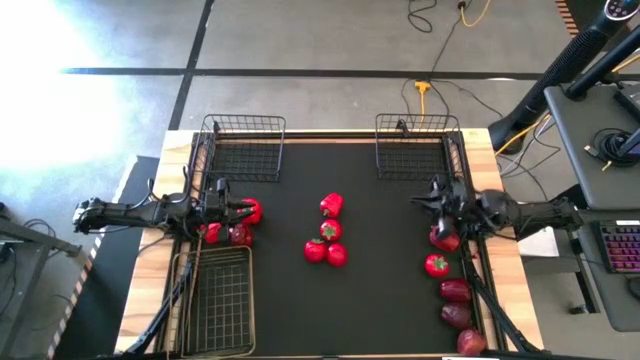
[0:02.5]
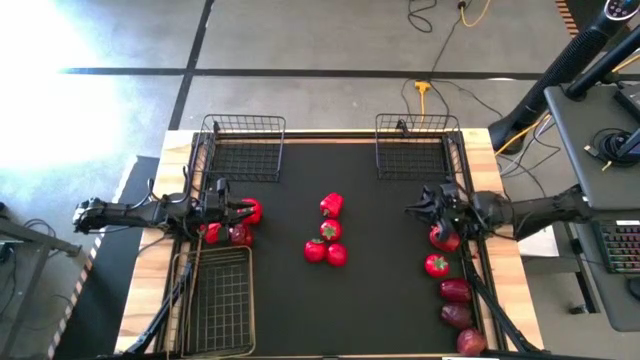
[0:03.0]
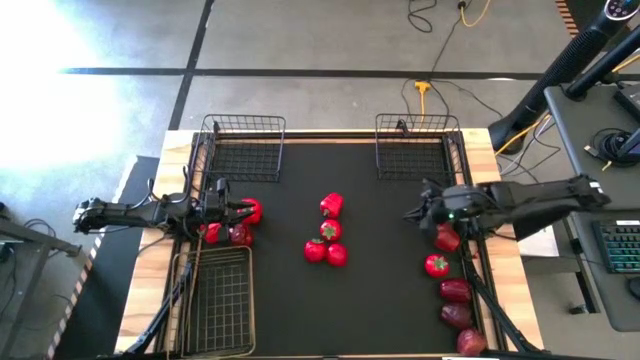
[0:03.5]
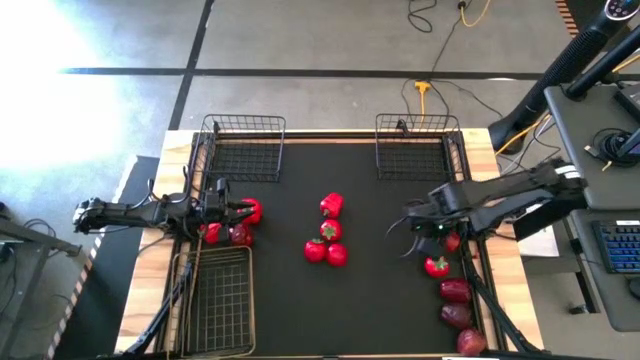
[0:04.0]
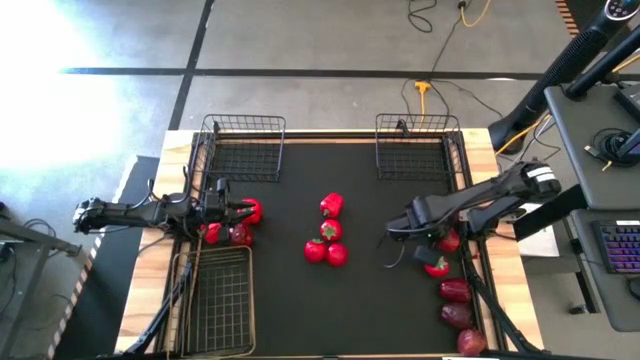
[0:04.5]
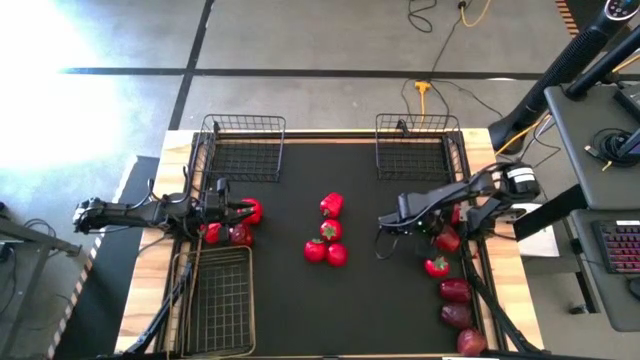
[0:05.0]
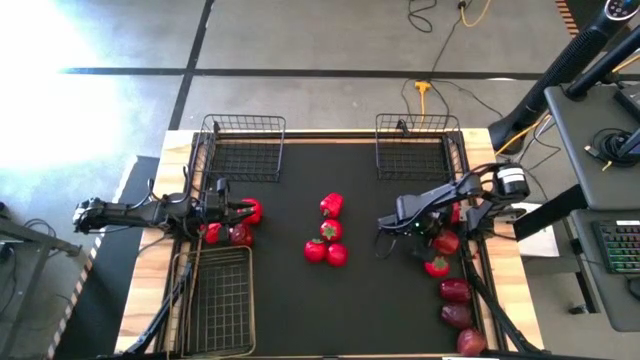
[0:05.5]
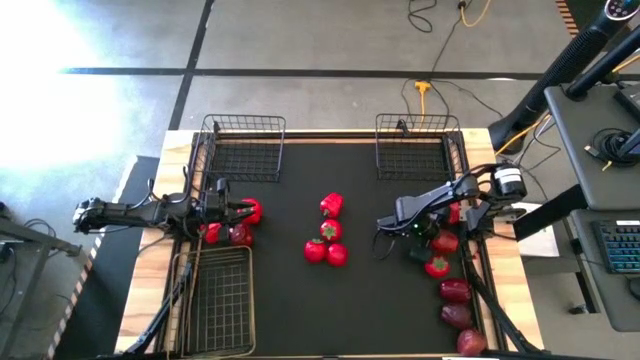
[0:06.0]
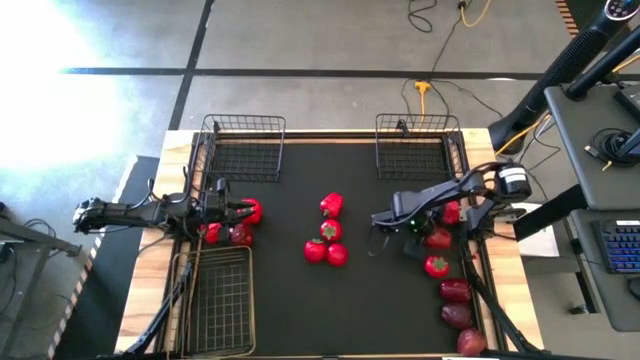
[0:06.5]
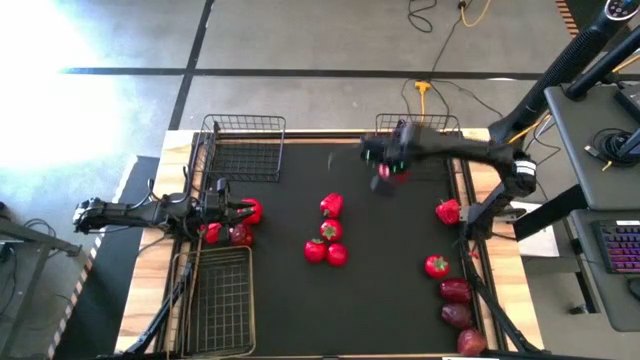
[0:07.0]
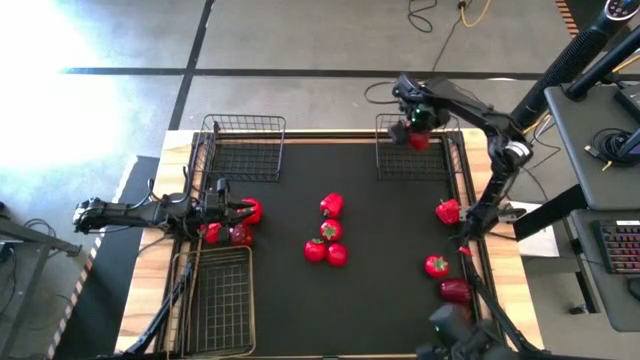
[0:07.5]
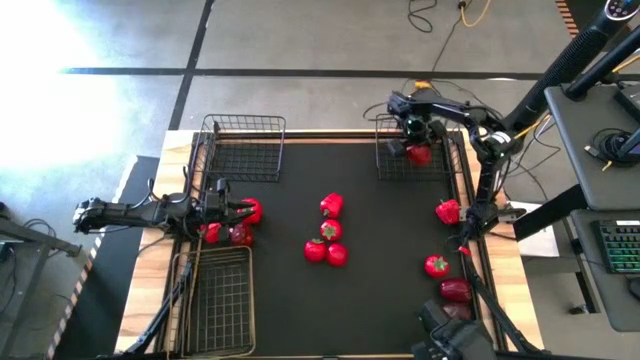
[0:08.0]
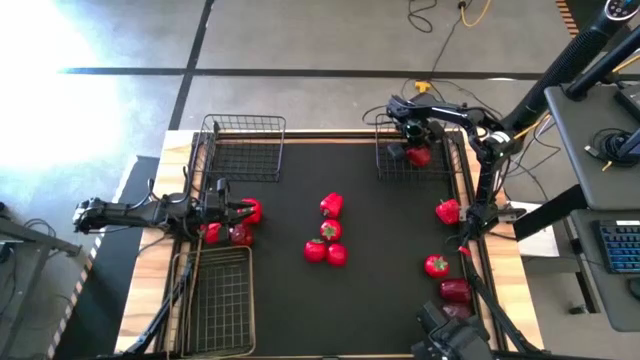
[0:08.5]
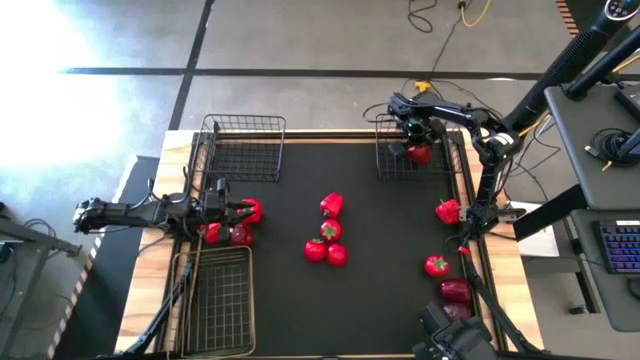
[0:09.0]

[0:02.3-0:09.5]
Task: Sort produce into baskets
Put the apple into the right black wire basket

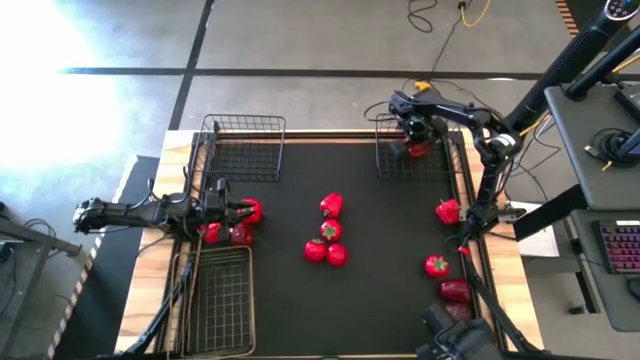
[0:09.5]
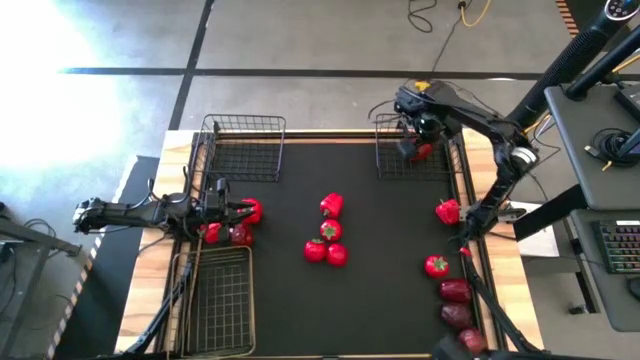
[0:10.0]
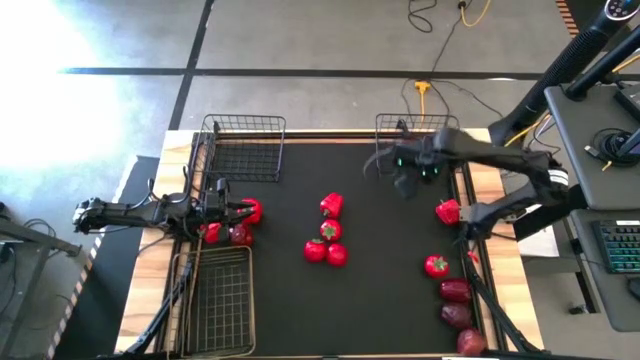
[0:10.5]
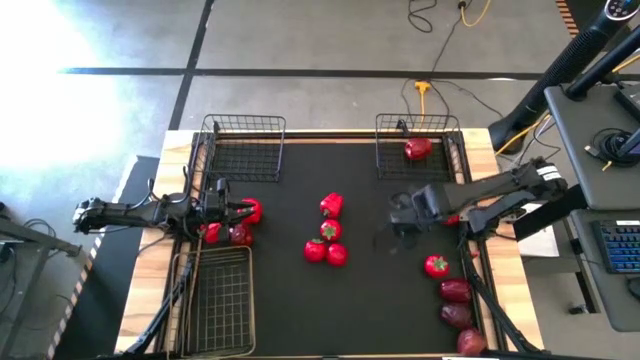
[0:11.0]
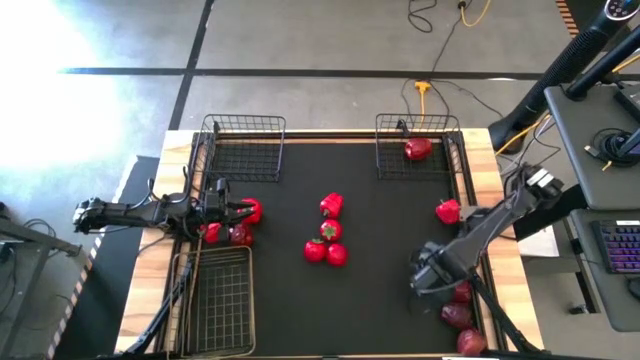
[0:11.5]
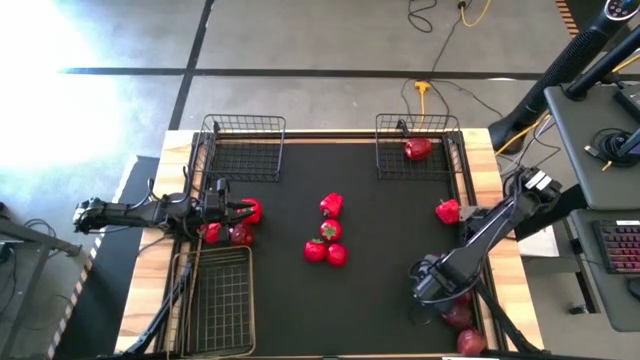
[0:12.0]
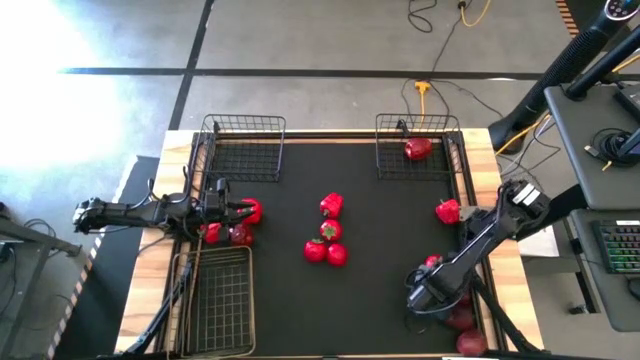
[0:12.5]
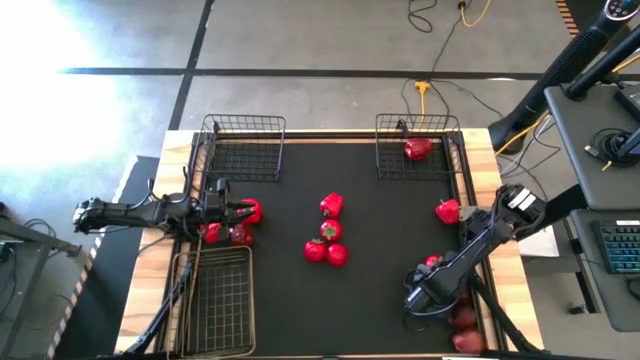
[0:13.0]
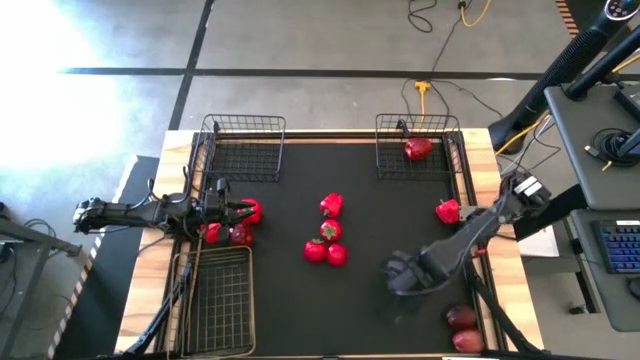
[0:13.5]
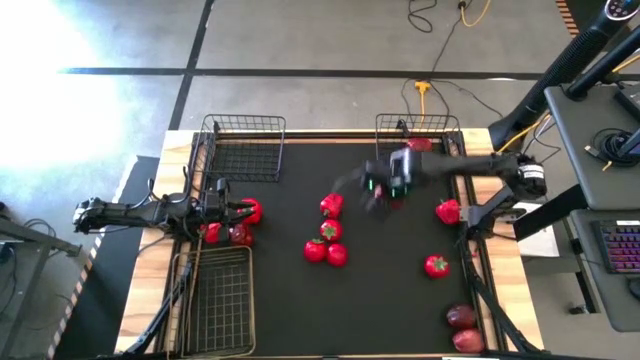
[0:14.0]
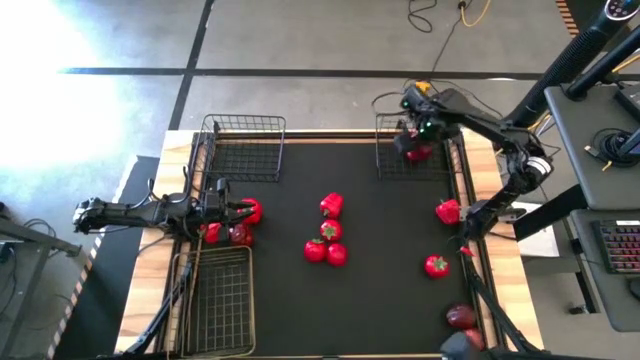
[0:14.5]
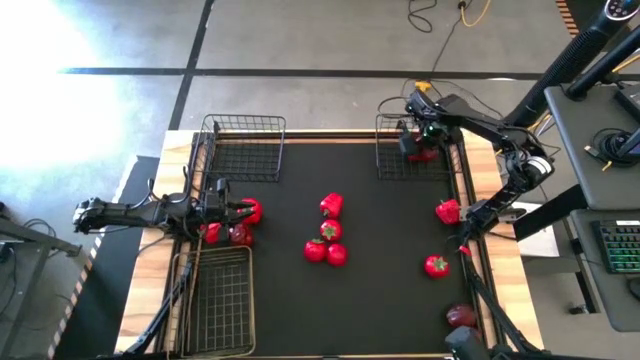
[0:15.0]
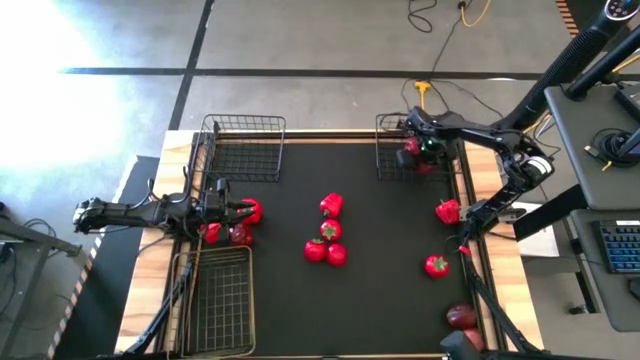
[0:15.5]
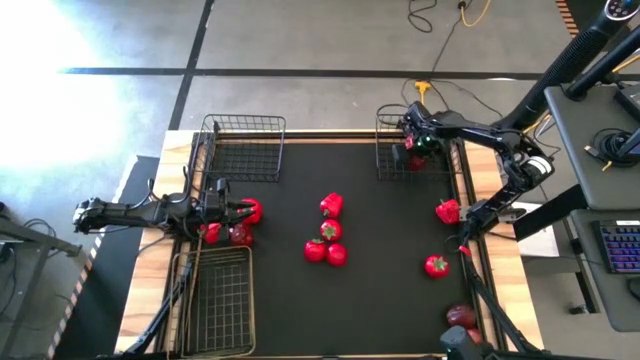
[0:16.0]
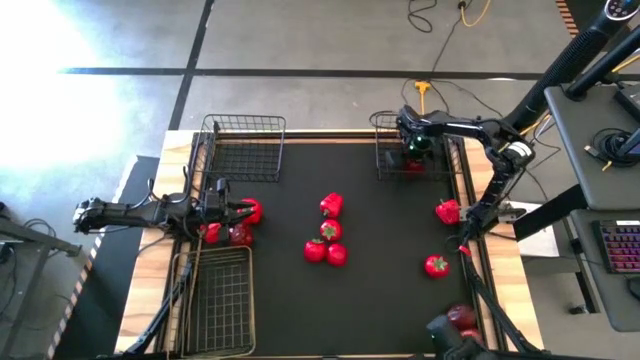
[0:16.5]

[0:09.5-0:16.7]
Put the apple into the right black wire basket

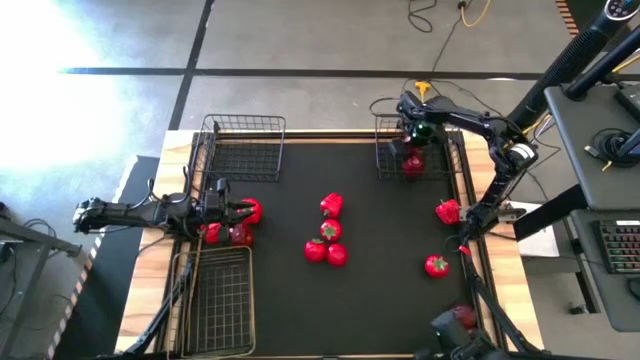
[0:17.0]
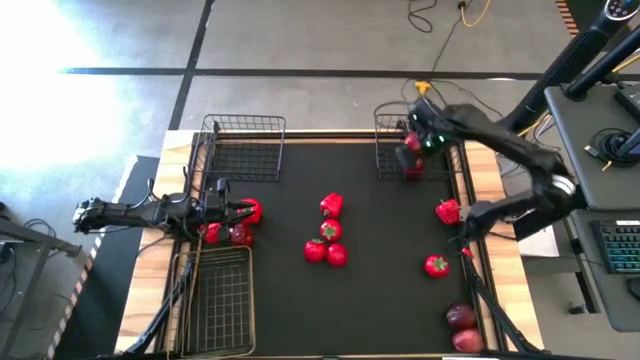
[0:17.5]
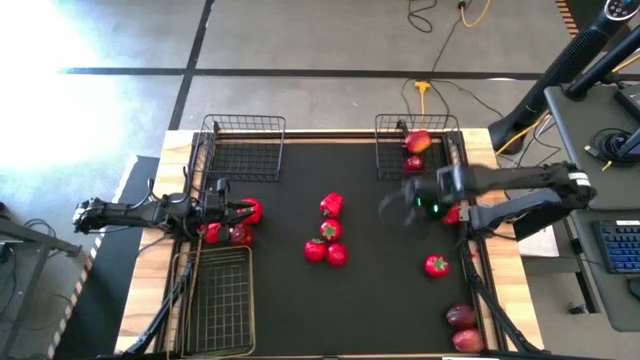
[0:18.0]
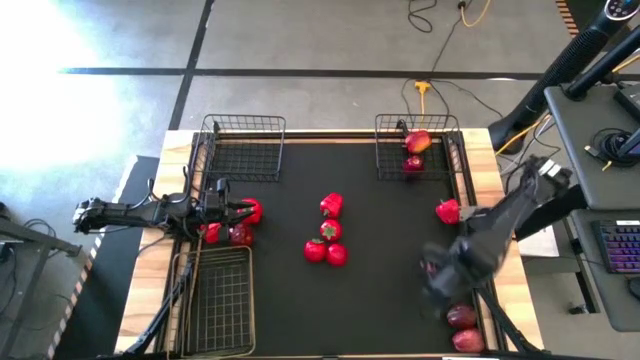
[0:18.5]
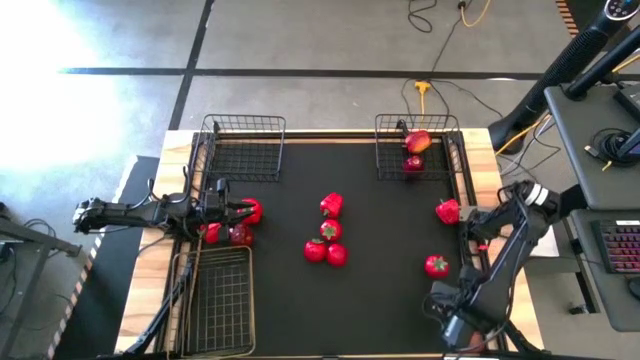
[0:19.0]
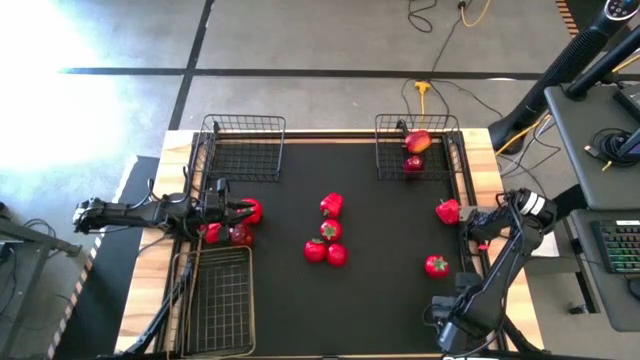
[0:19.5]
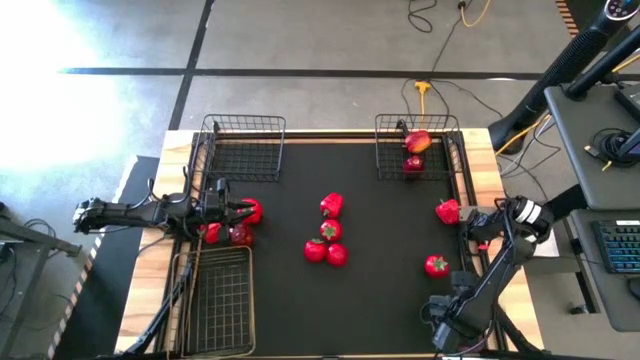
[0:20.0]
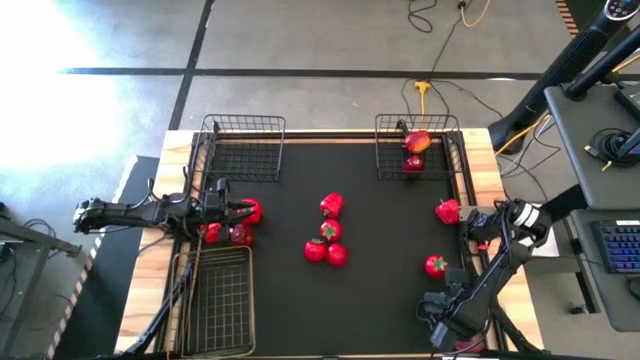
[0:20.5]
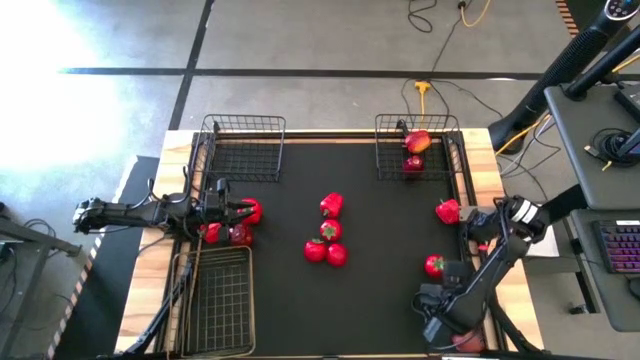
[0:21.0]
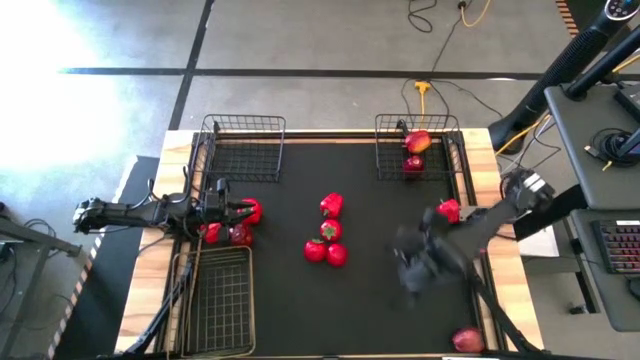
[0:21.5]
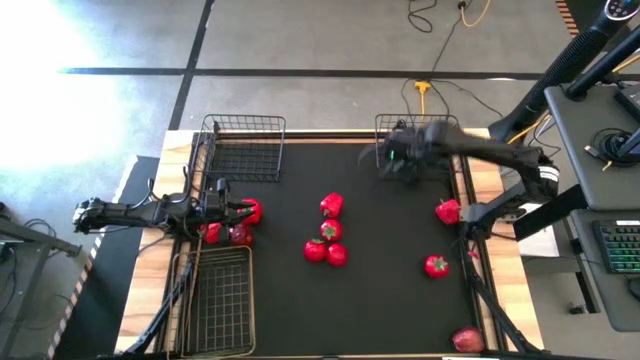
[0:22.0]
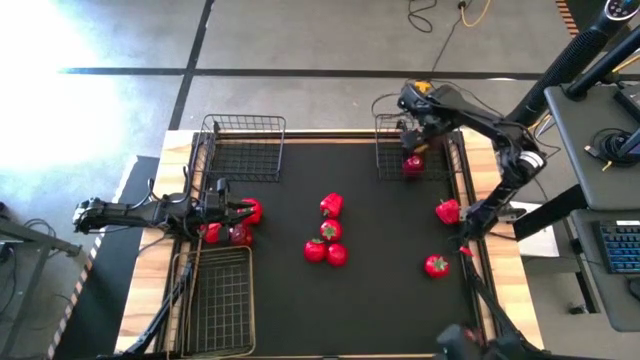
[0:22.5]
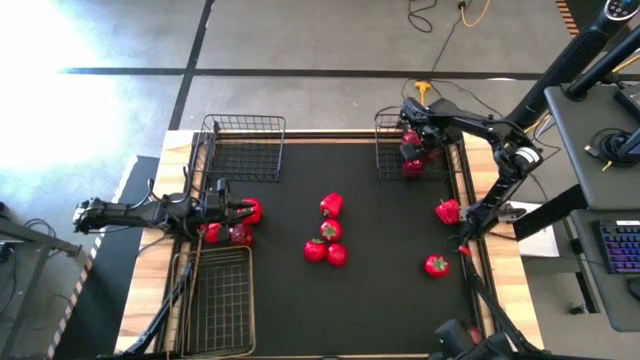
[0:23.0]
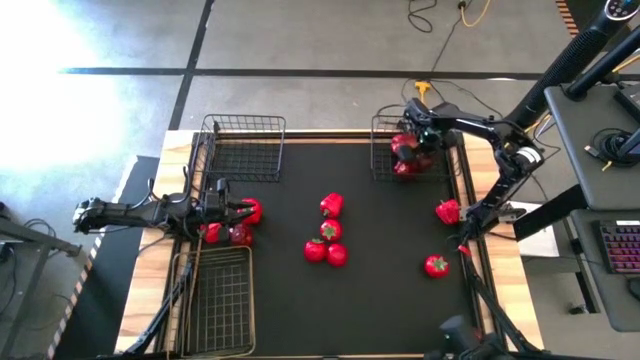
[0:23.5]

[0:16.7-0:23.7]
Put the apple into the right black wire basket

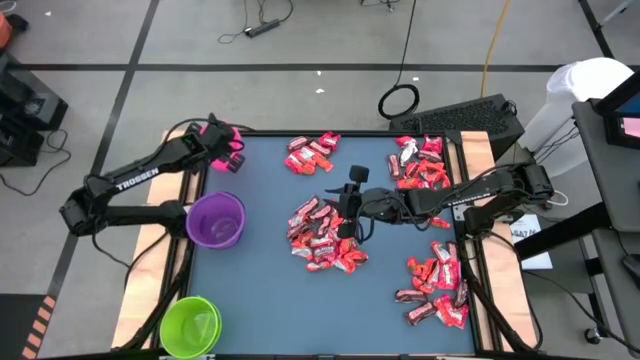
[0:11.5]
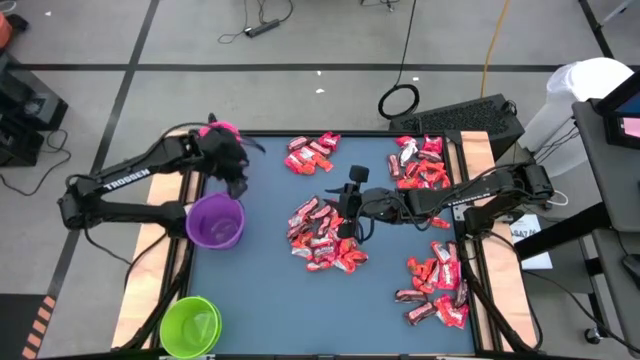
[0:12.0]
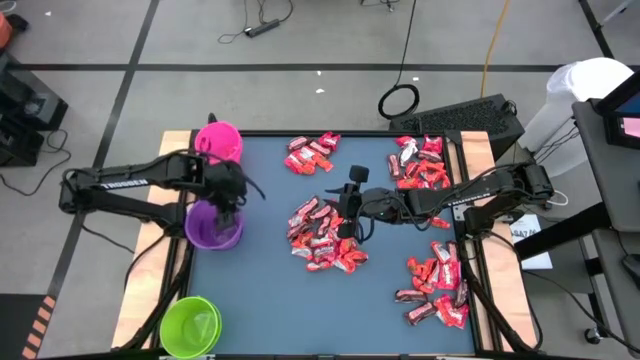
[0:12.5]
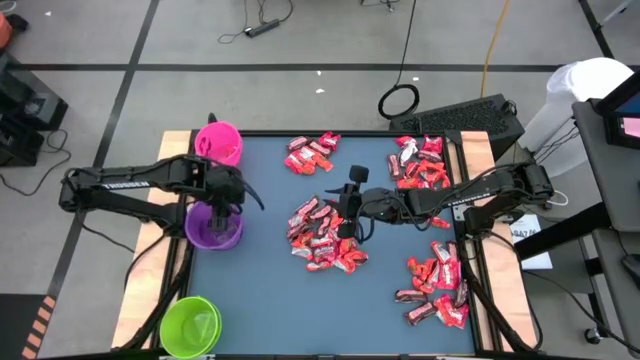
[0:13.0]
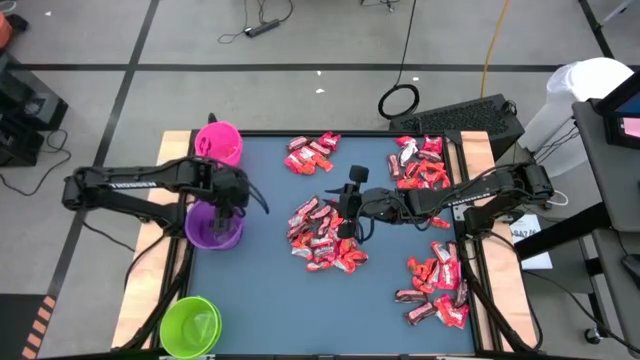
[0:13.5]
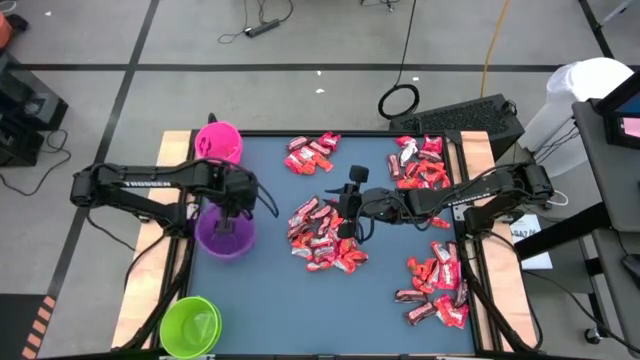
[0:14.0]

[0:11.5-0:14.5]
Task: Organize candy in baskets
Adjust the purple bucket
